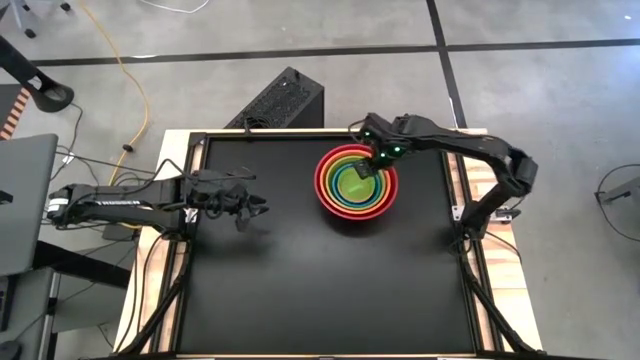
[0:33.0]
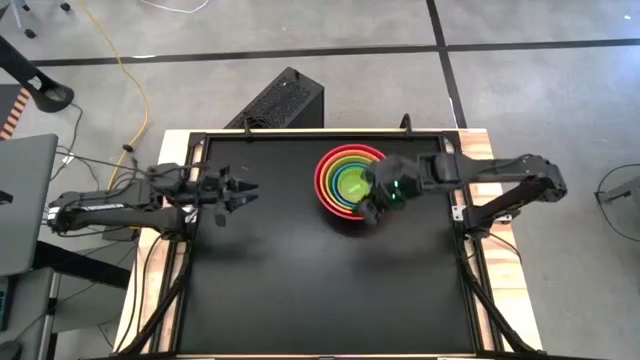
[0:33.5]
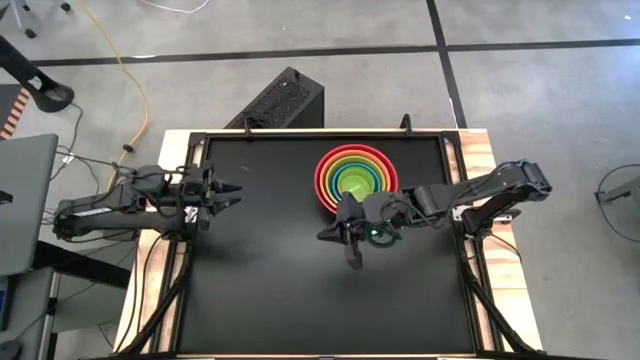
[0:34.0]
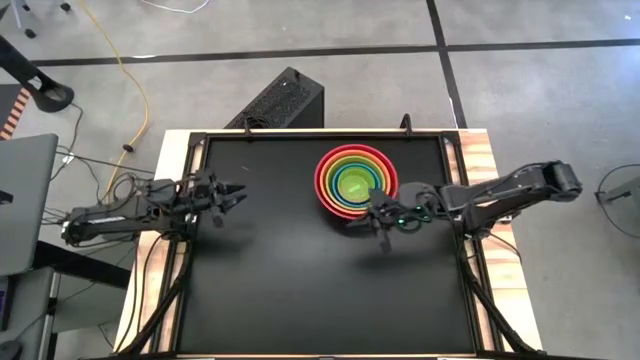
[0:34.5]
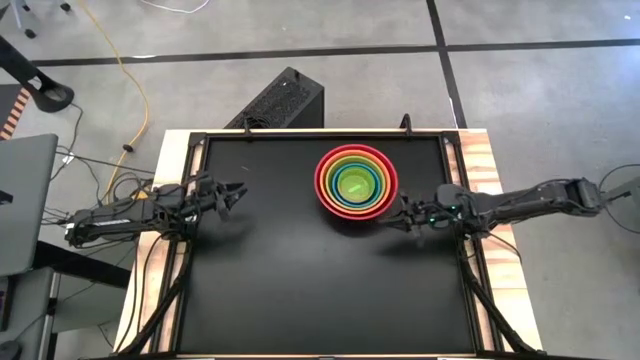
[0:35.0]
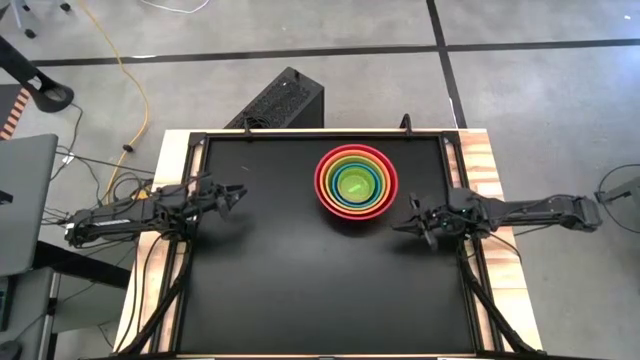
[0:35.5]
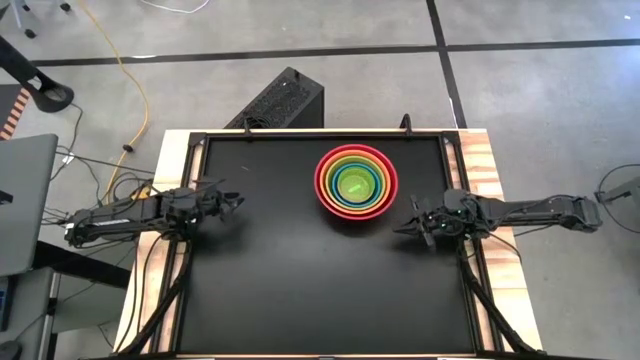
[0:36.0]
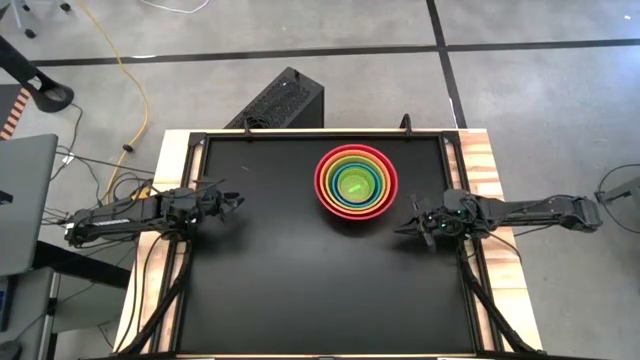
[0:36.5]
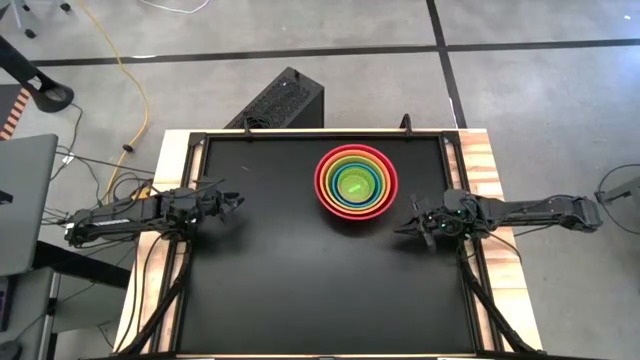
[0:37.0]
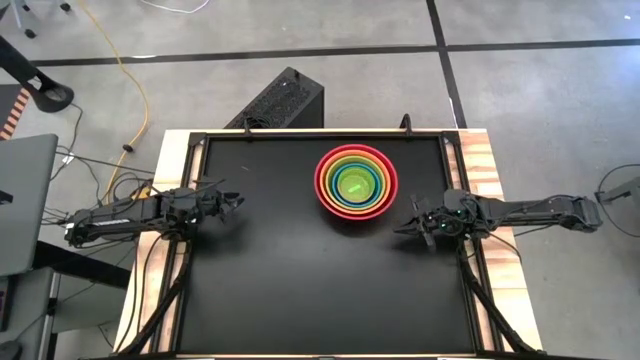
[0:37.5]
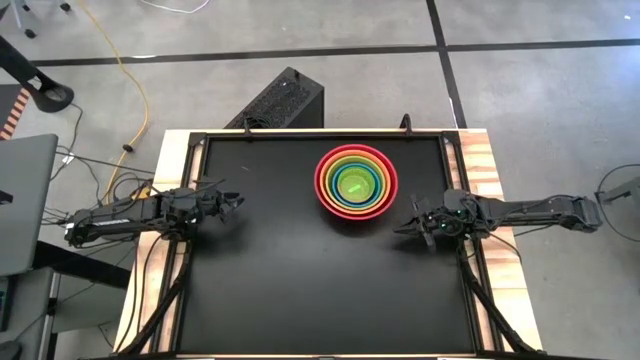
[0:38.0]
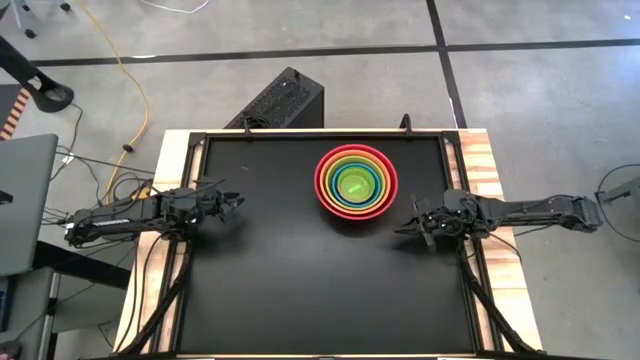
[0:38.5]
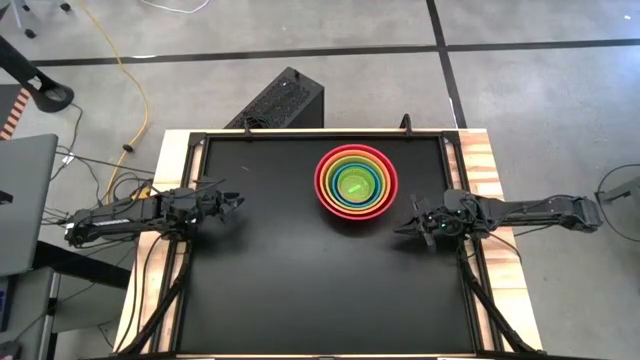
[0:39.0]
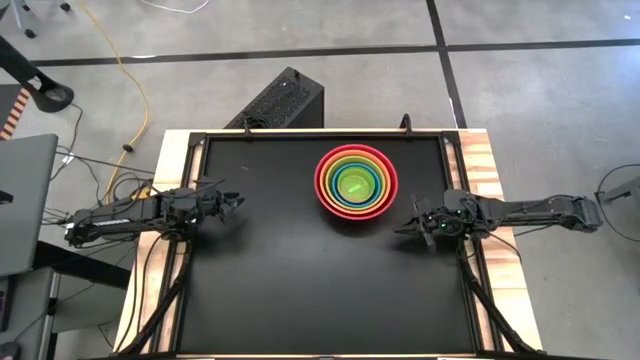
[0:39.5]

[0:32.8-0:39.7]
Return to Home Position
